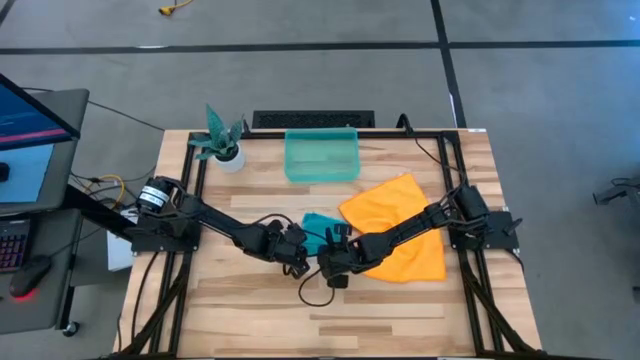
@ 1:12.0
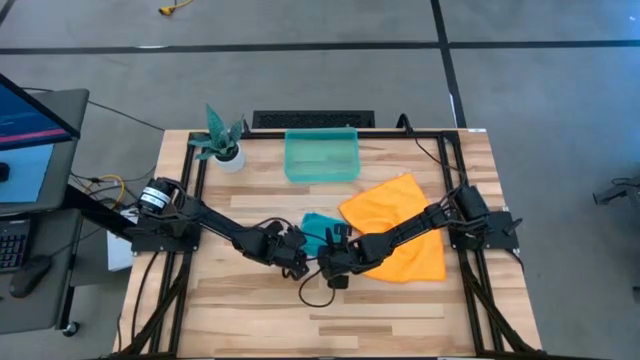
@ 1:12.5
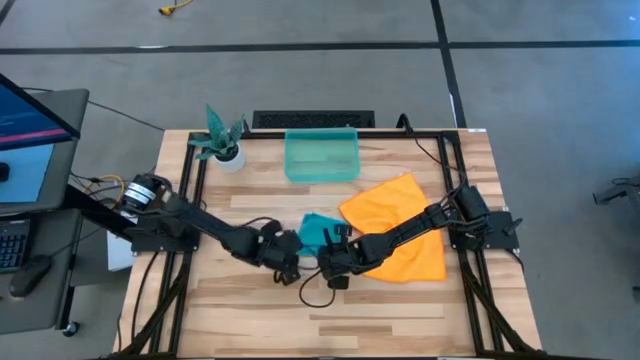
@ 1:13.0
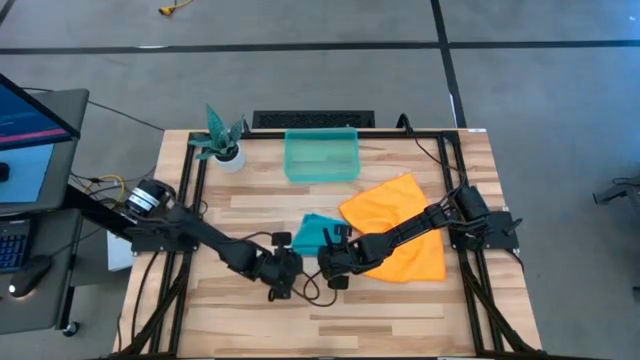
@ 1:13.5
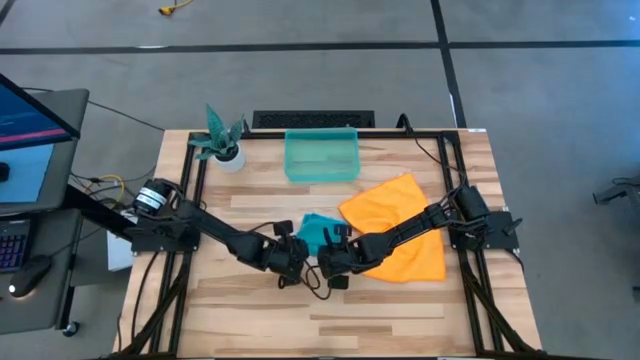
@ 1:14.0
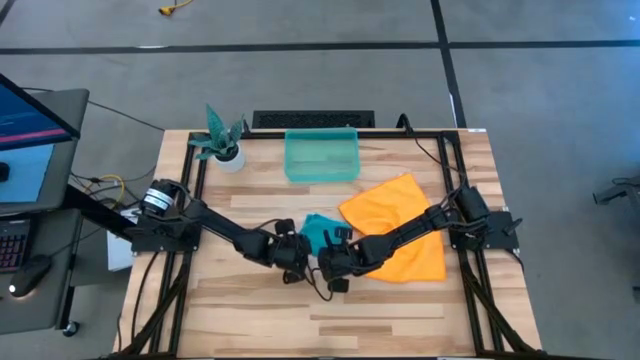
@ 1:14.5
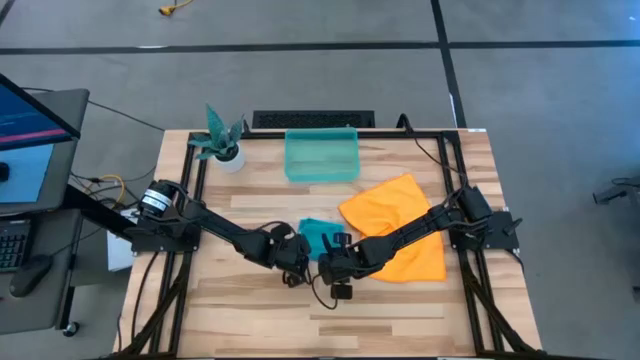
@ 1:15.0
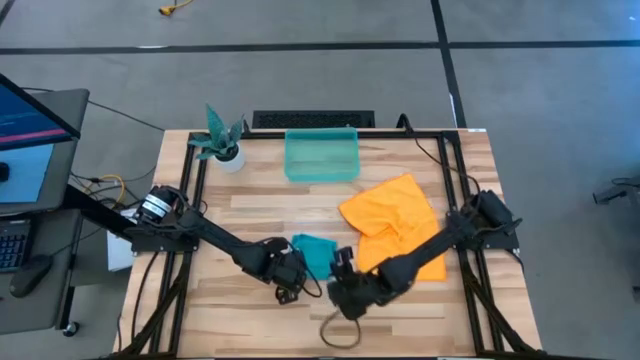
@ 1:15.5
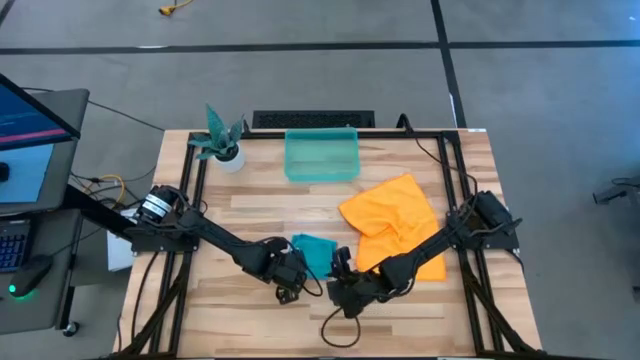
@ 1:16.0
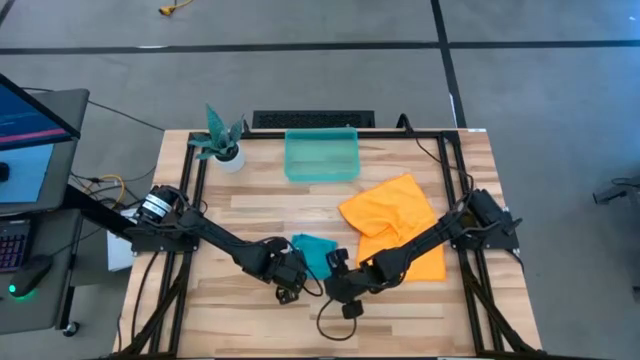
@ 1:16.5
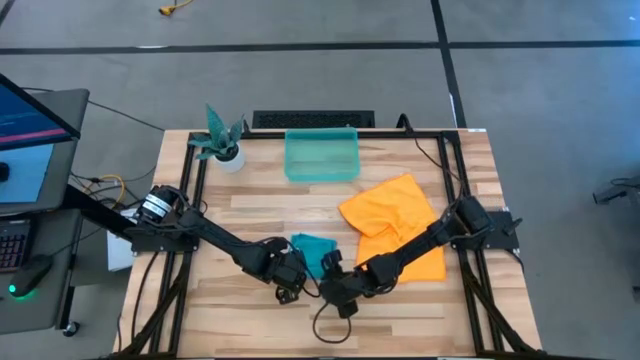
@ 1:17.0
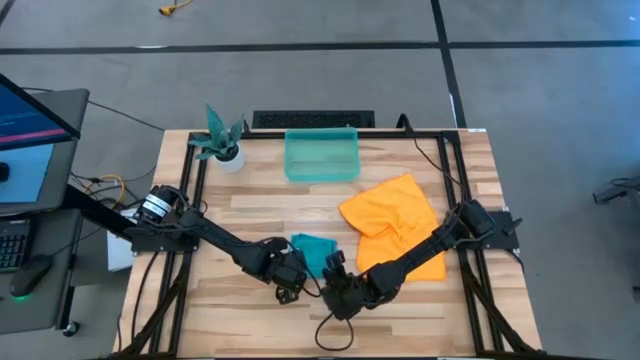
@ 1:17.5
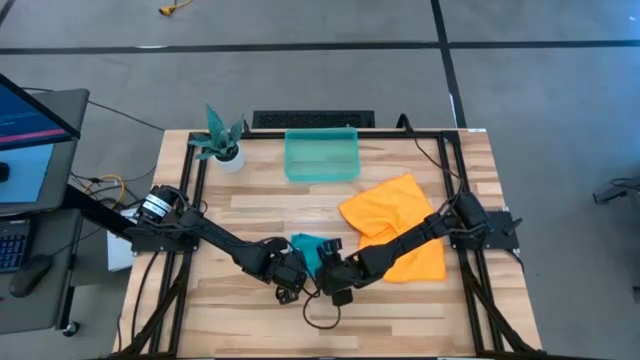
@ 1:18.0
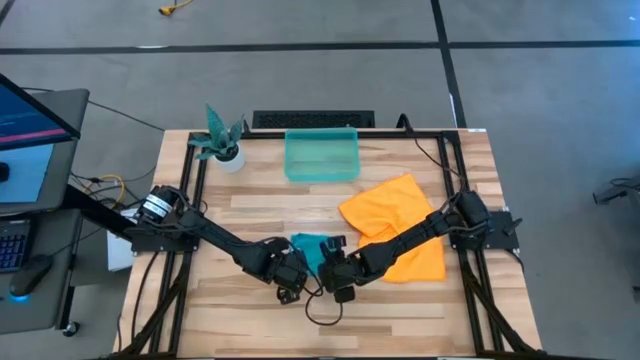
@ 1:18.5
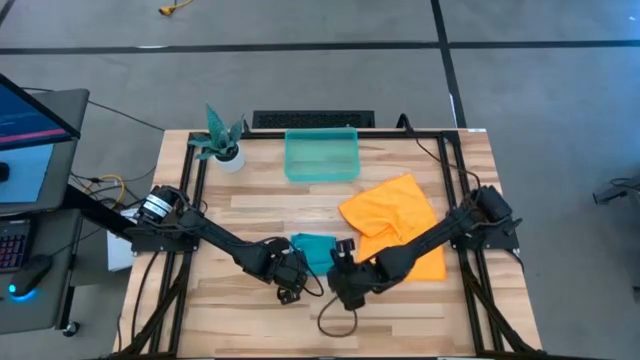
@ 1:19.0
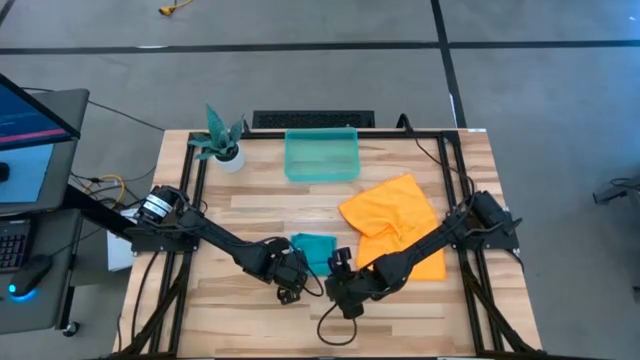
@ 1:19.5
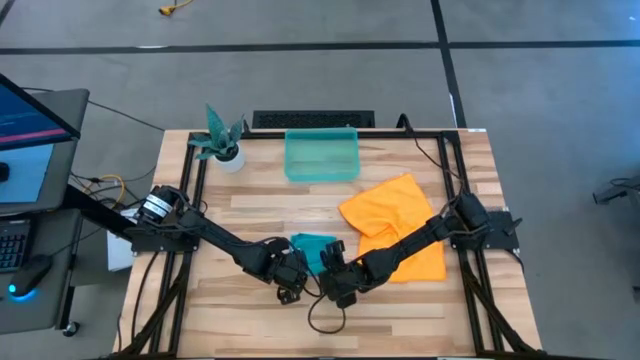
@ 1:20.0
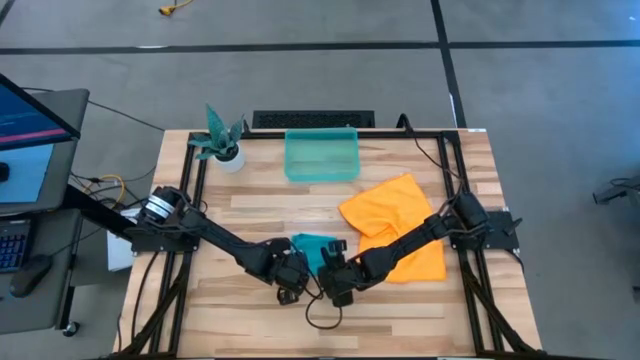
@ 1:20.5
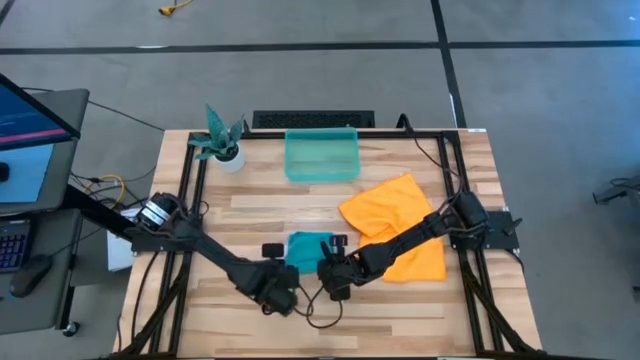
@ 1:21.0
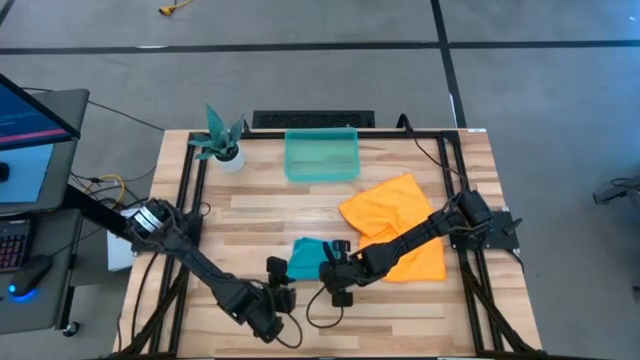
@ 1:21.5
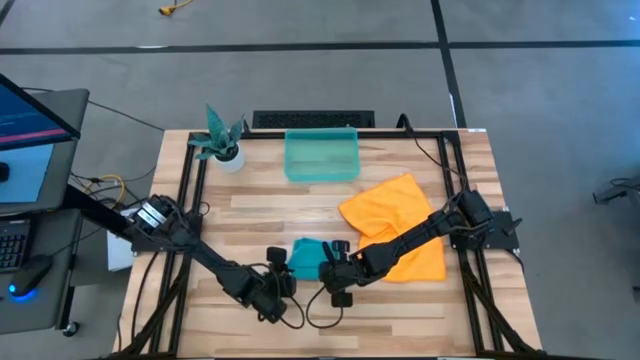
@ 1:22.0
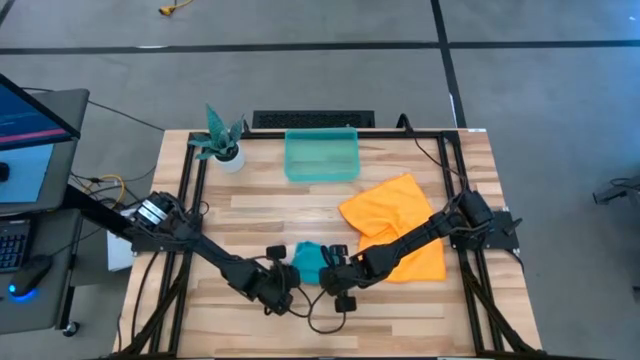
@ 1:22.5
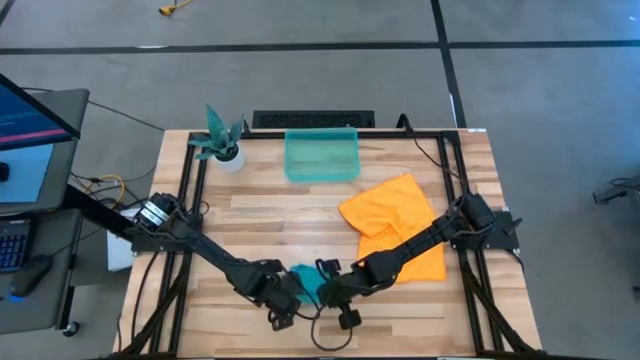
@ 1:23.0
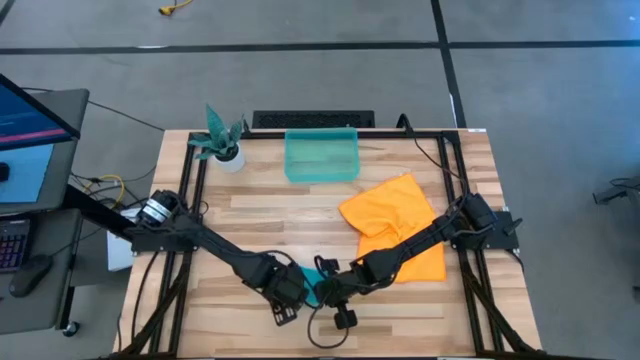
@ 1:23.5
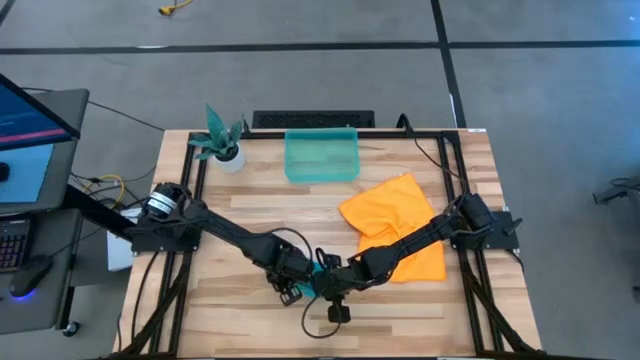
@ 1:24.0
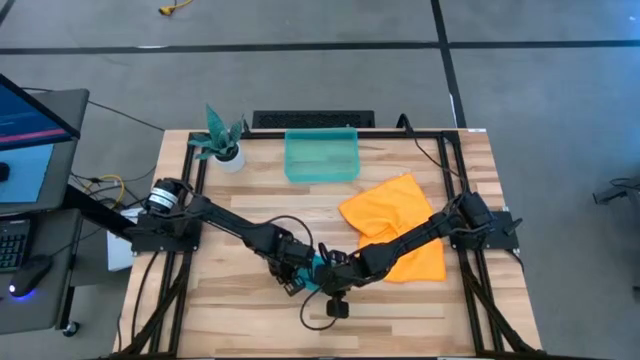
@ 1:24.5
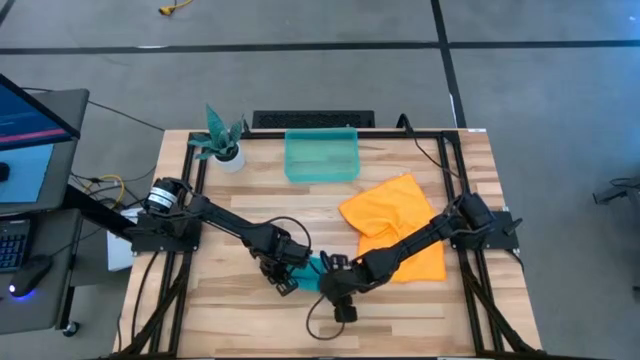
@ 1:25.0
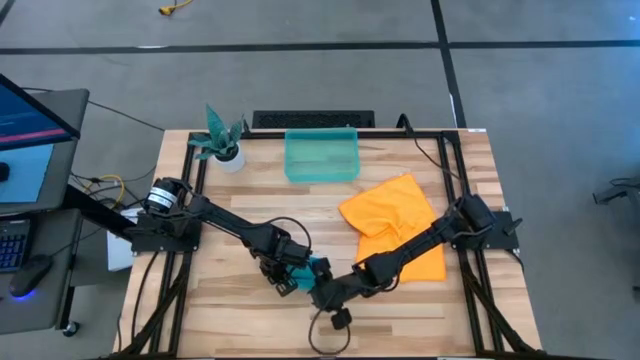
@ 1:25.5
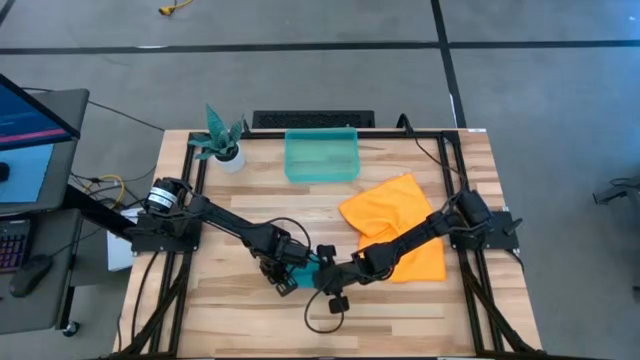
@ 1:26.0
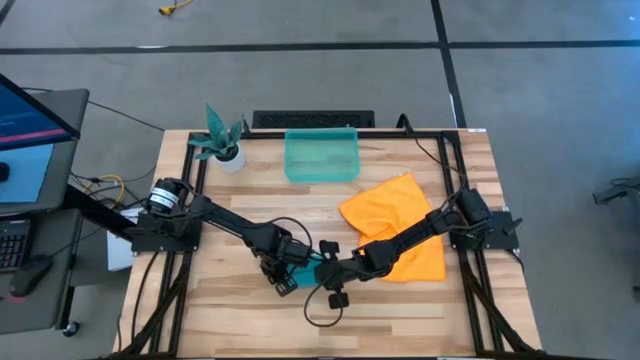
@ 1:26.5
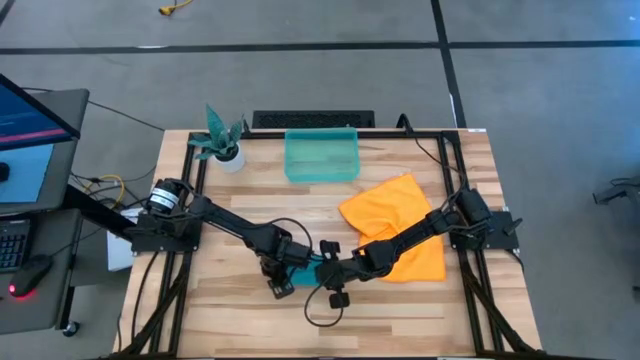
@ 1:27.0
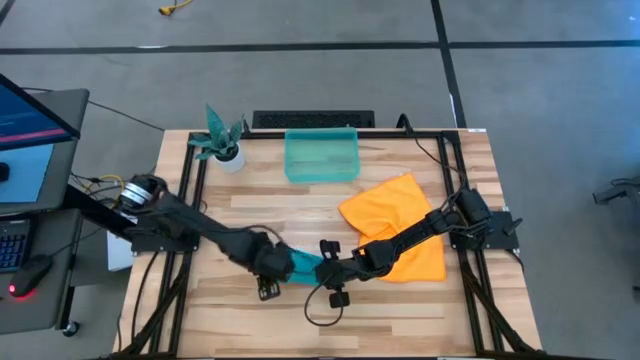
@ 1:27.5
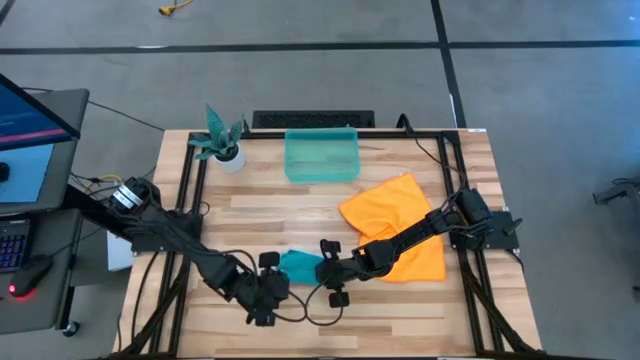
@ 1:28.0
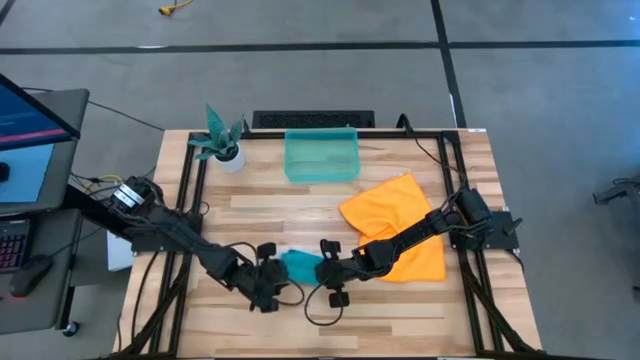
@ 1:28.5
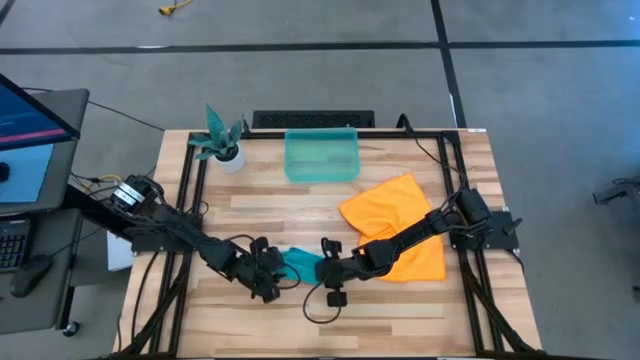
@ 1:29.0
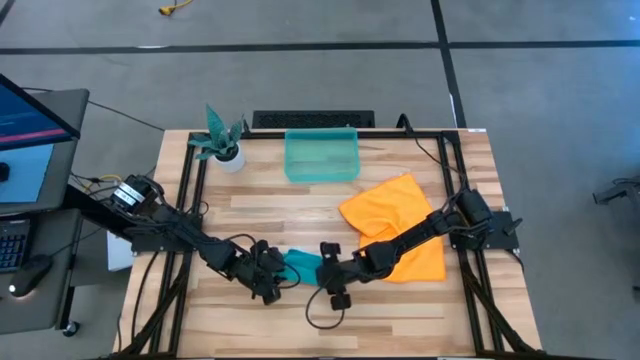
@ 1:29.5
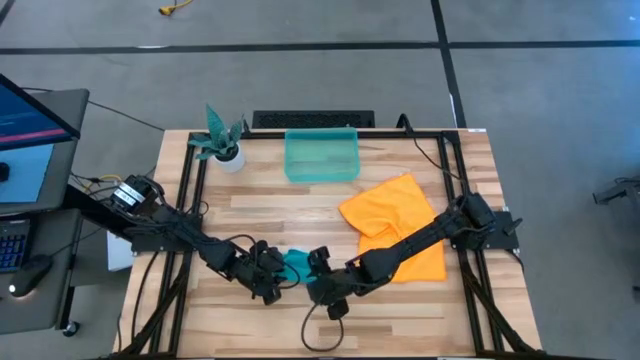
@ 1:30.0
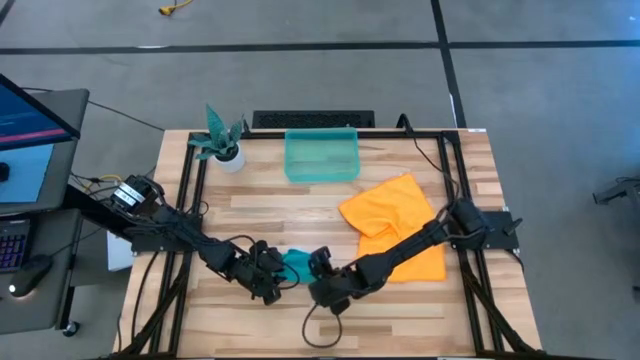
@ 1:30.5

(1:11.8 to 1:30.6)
Task: Roll microfiber towels into tight, uniform cylinder then place into a basket
Roll the blue microfiber cloth

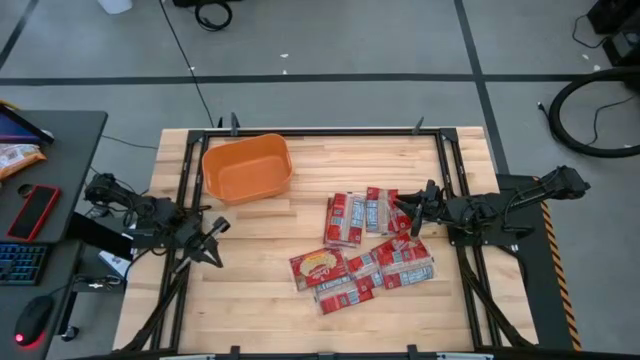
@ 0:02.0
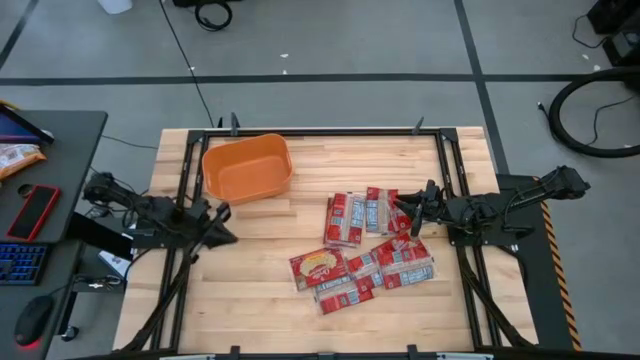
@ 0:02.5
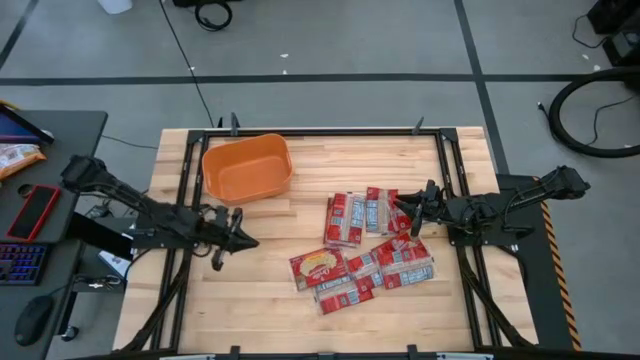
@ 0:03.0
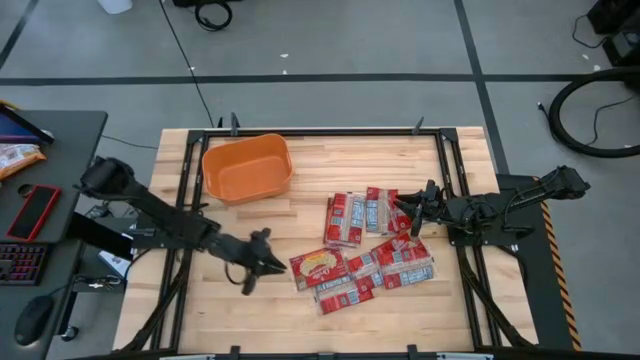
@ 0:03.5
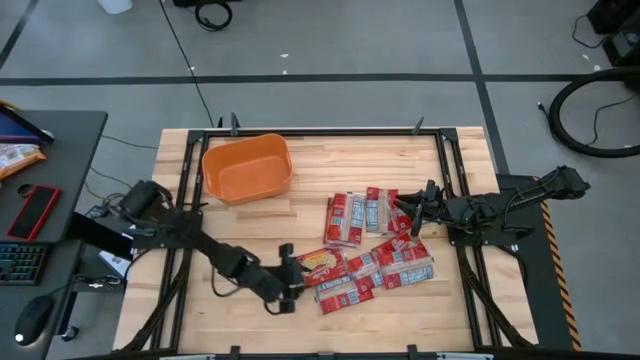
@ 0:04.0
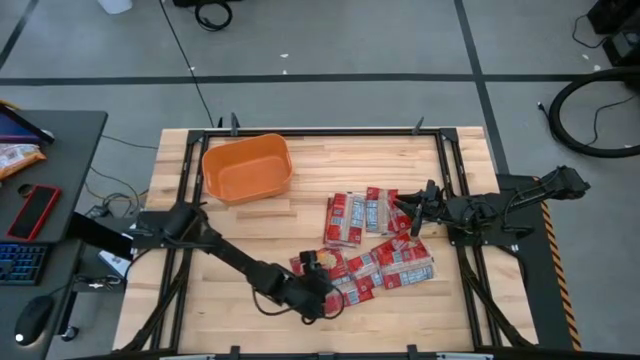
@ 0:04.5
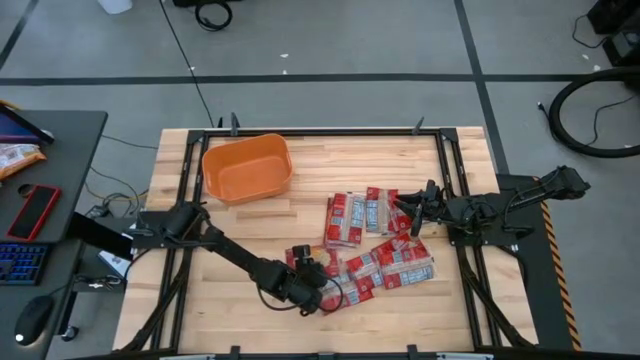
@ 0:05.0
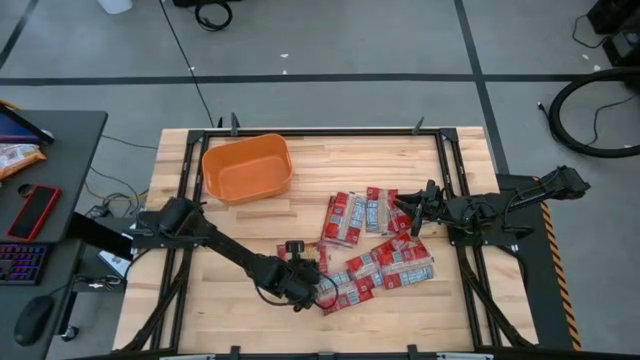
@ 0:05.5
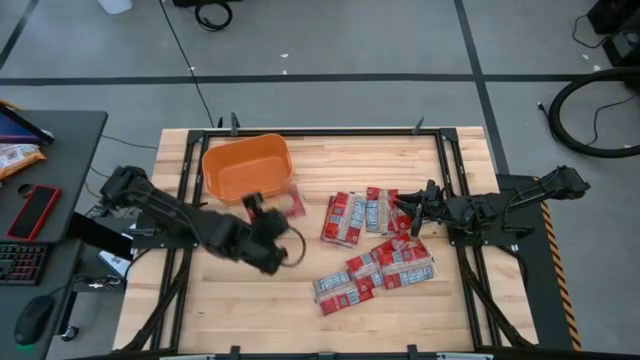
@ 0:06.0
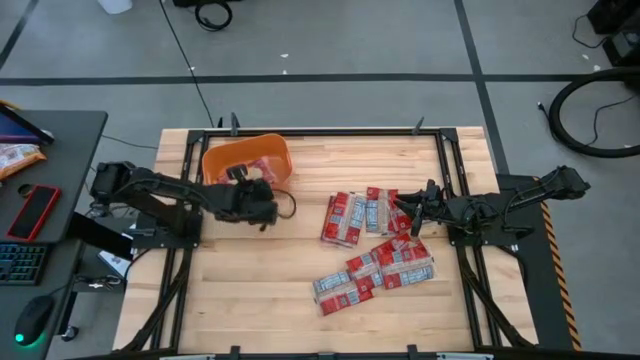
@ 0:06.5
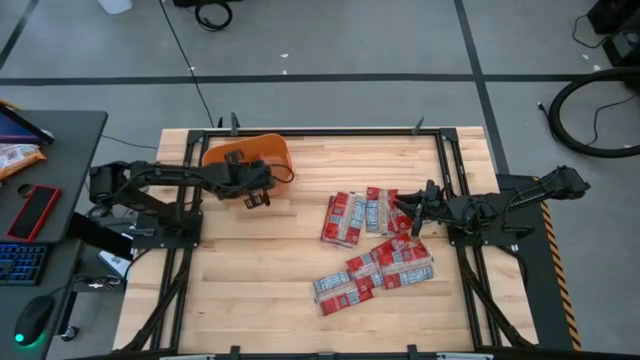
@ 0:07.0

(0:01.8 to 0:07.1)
Task: Sort popcorn bags into baskets
Put the red popcorn bag into the orange bin
